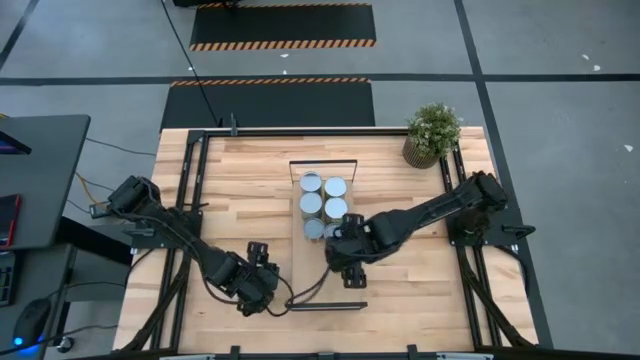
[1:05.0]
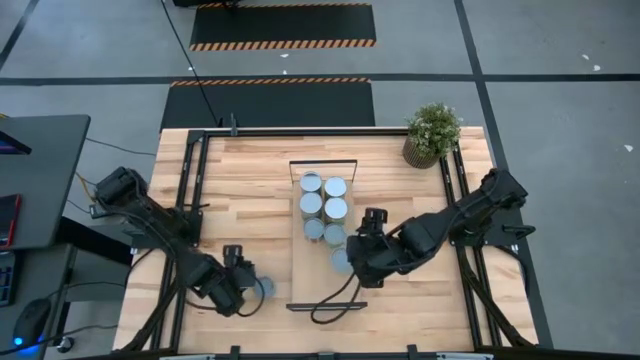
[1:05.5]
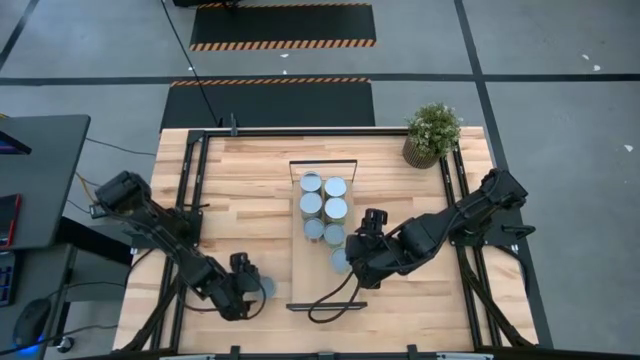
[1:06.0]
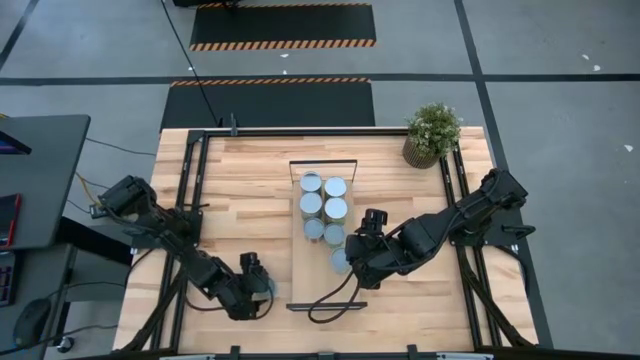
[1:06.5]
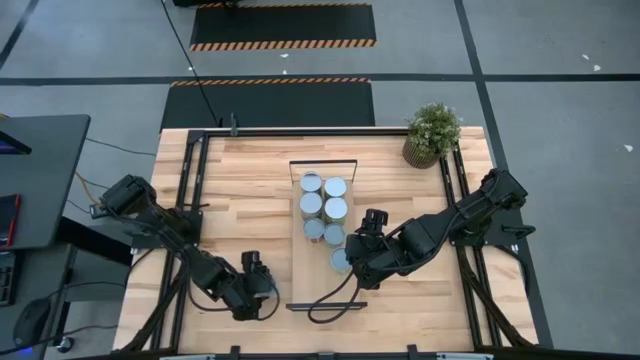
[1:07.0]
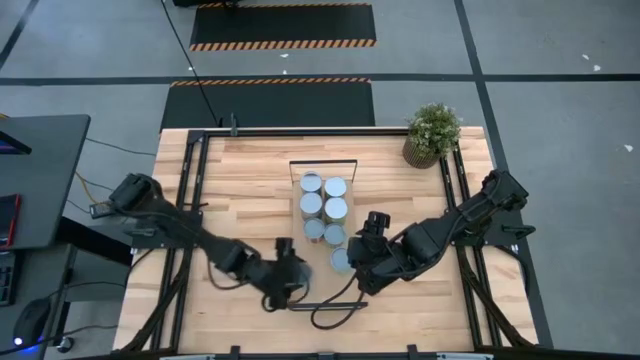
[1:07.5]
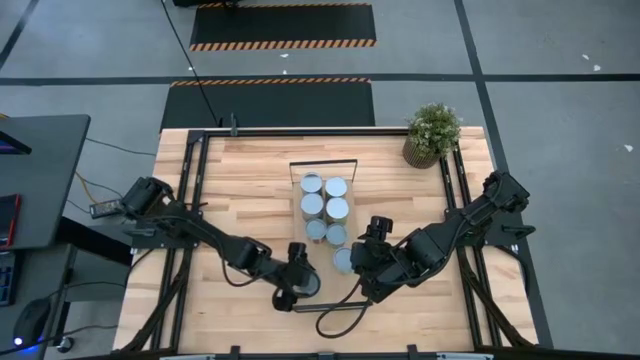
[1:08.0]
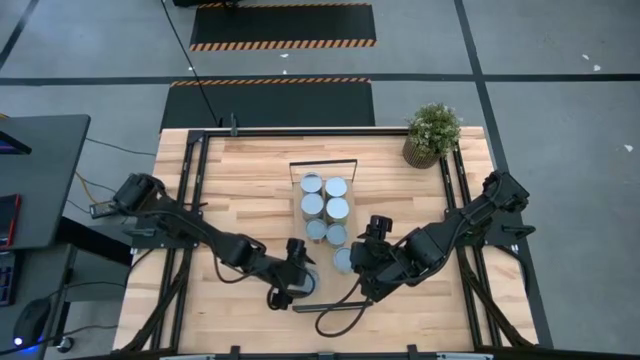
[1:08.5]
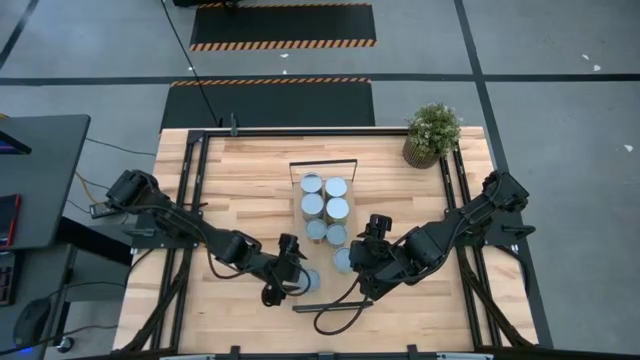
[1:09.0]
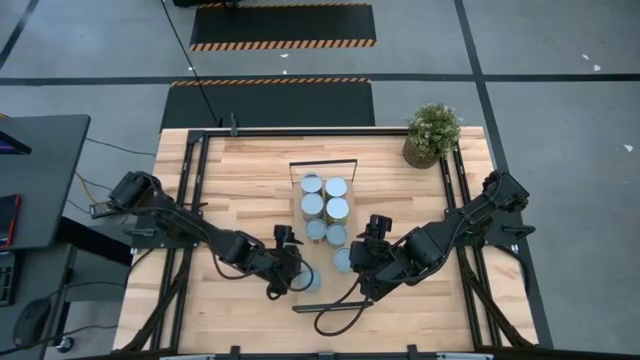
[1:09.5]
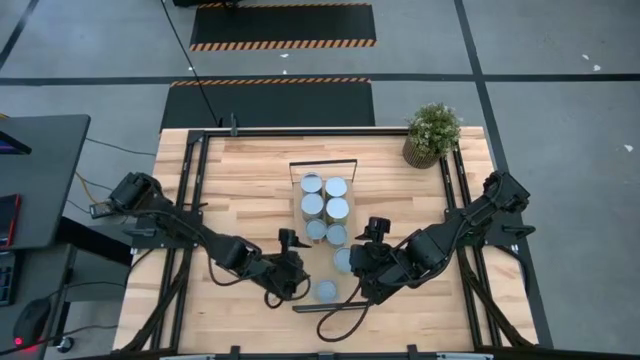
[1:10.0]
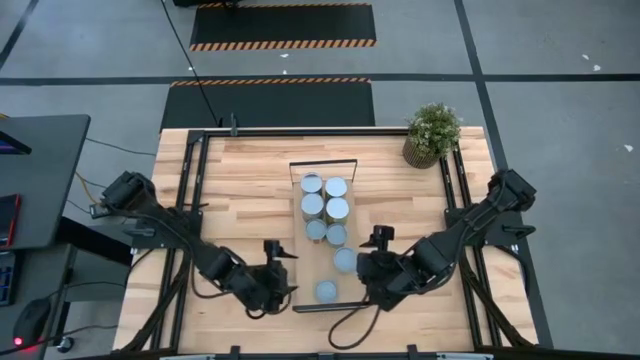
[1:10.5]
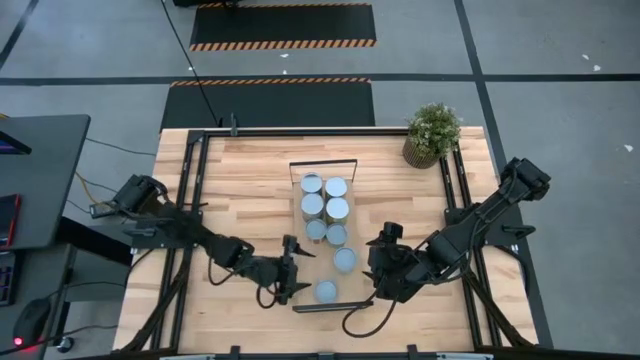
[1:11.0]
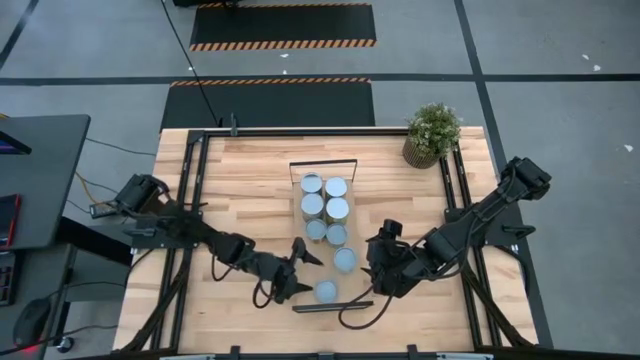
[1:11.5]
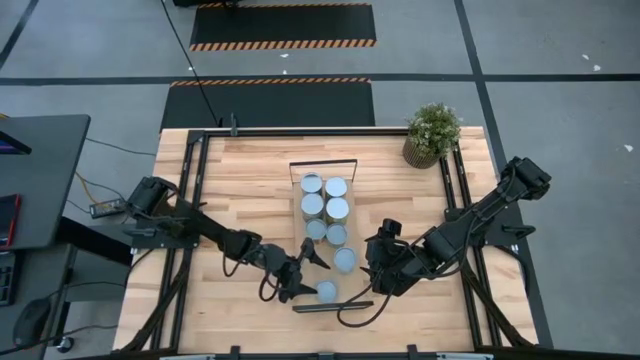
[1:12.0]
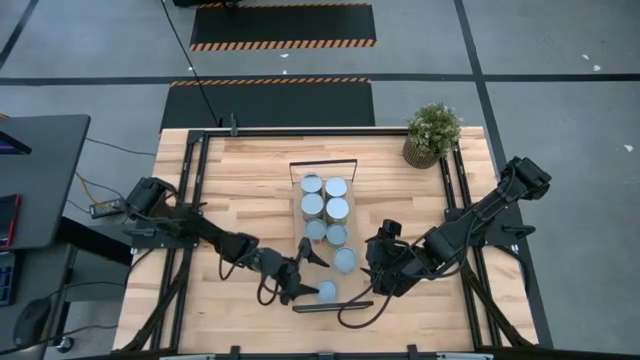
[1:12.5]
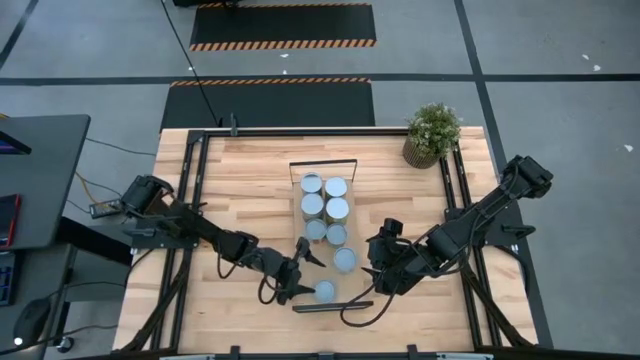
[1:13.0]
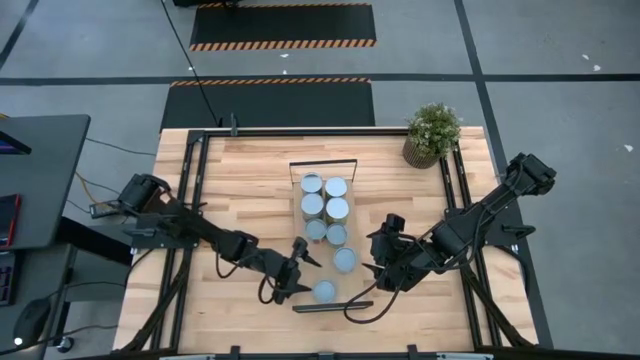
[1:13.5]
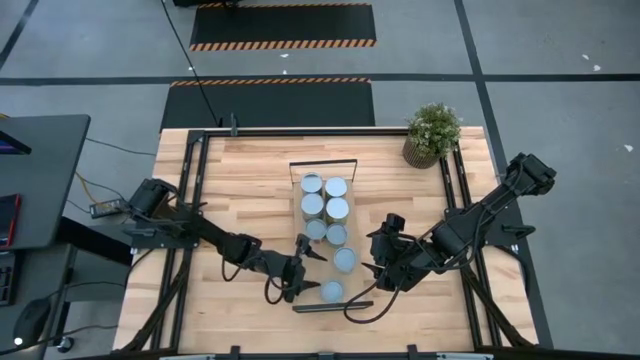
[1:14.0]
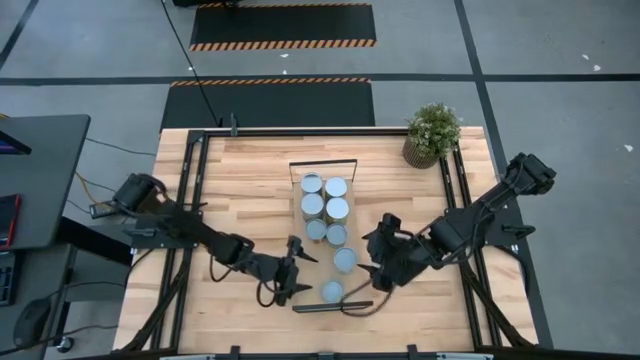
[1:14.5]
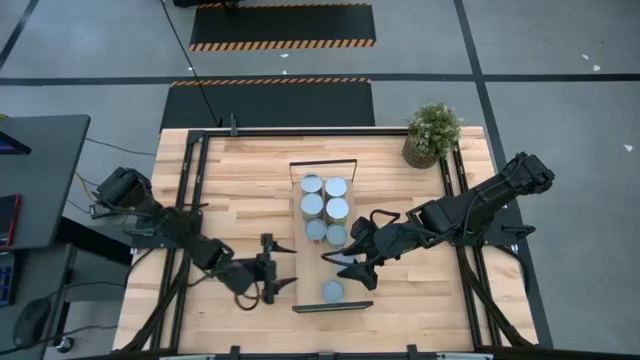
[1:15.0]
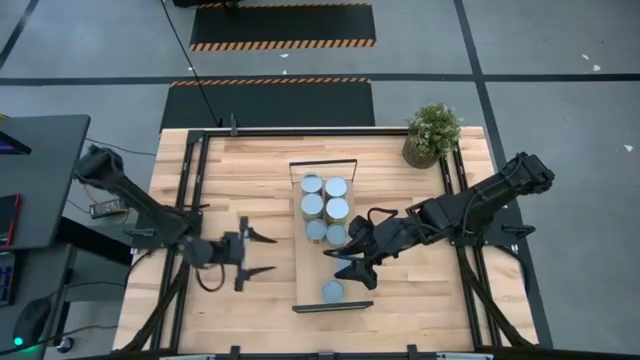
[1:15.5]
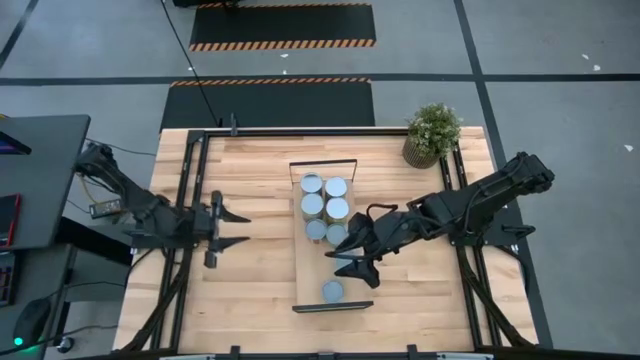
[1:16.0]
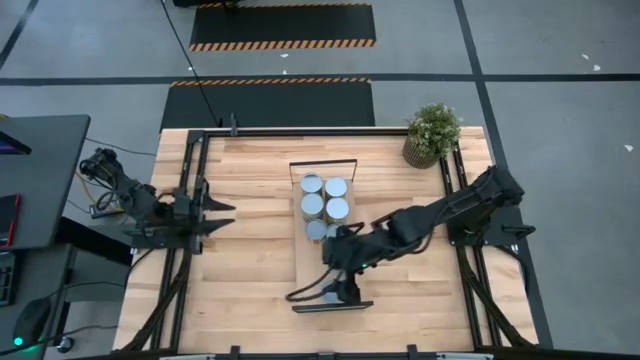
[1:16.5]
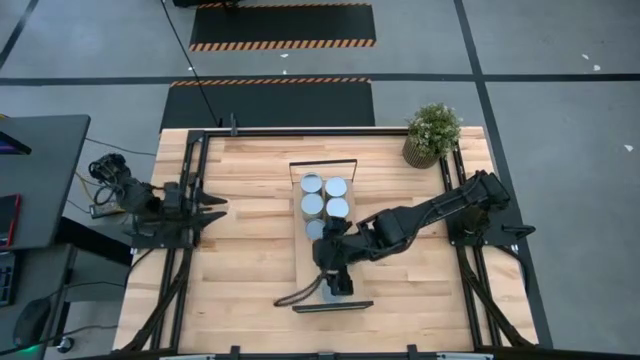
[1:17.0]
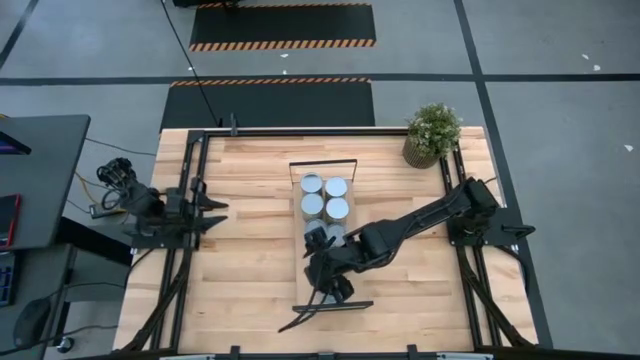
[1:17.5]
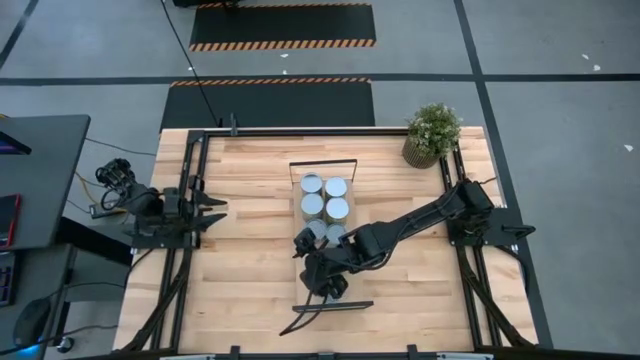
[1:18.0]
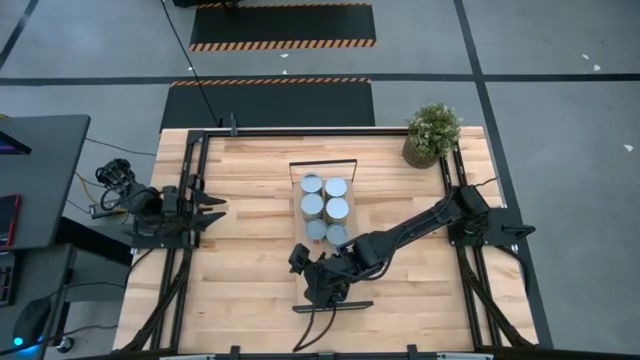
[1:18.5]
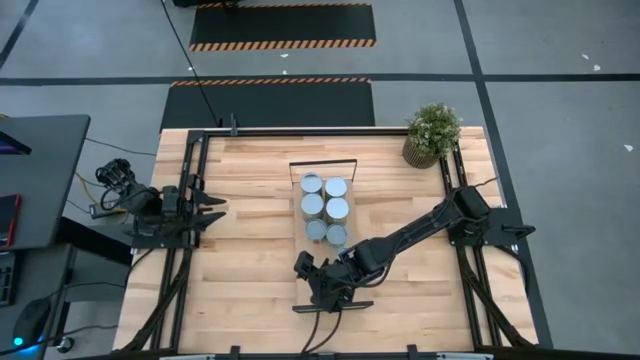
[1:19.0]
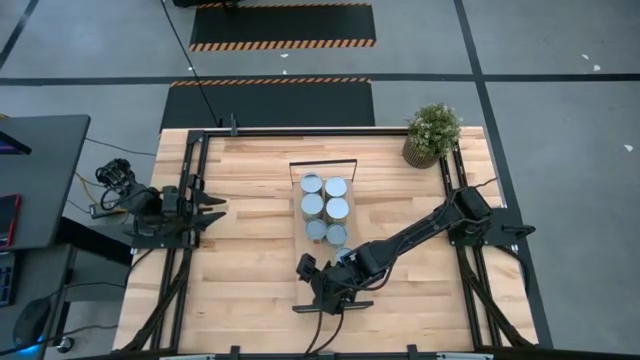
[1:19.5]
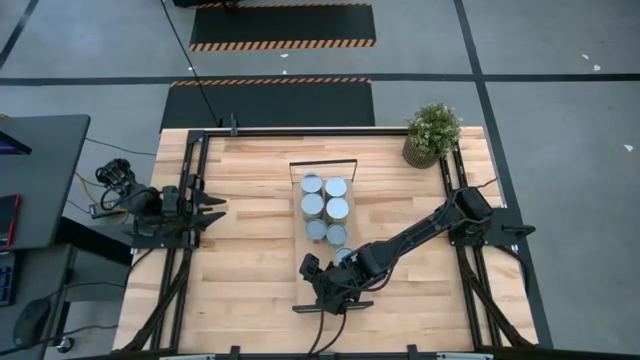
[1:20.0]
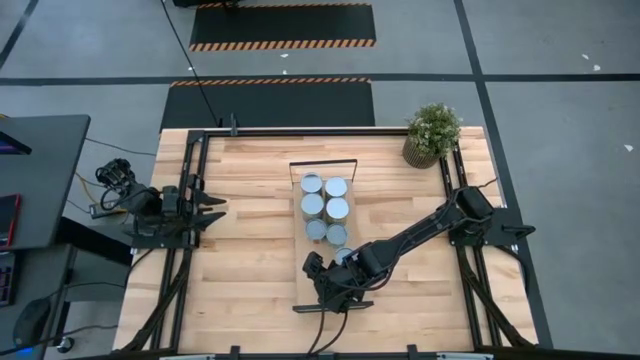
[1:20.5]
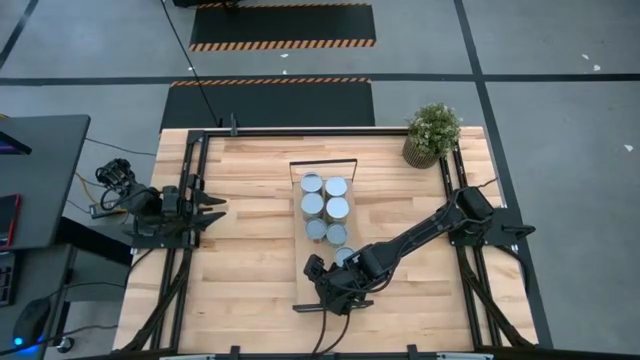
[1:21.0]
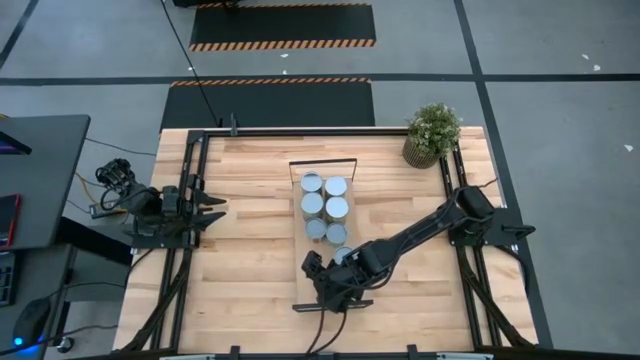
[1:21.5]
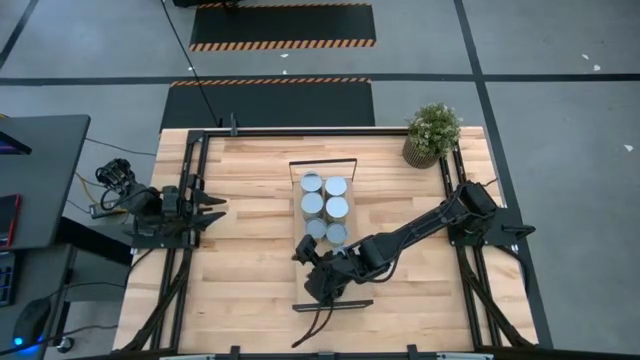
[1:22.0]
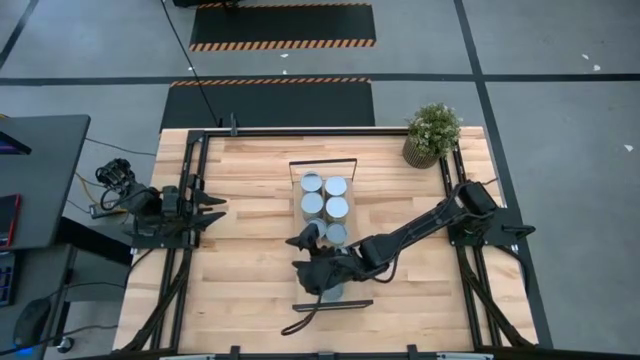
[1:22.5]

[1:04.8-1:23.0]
Task: Pick and place cans onto a shelf
Put the canned tuna on the shelf
